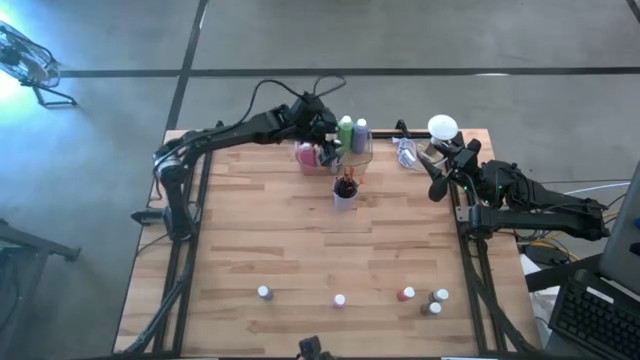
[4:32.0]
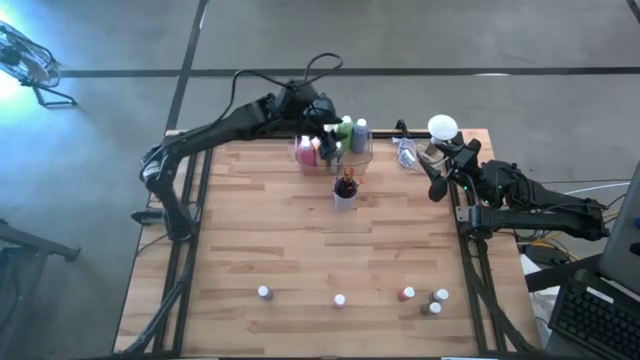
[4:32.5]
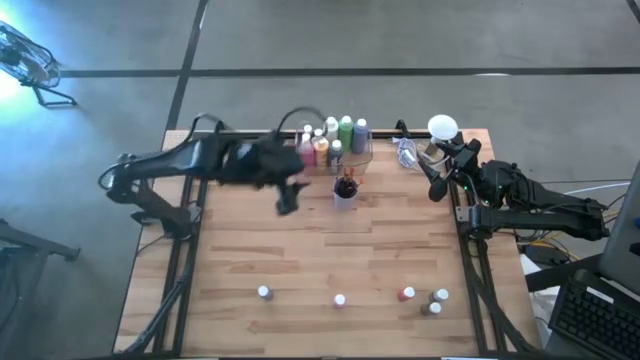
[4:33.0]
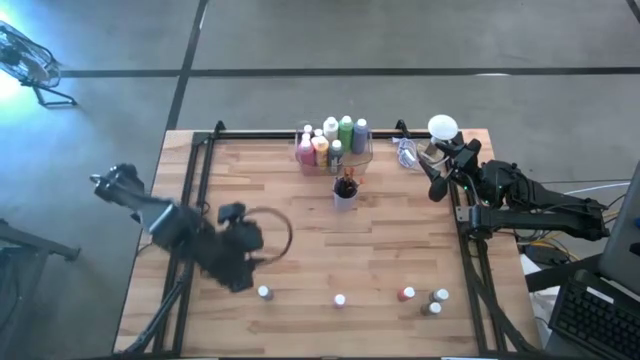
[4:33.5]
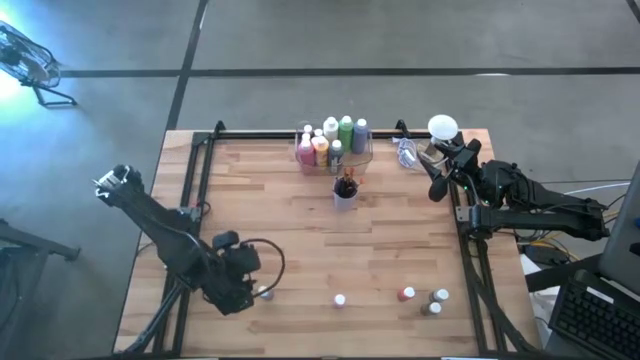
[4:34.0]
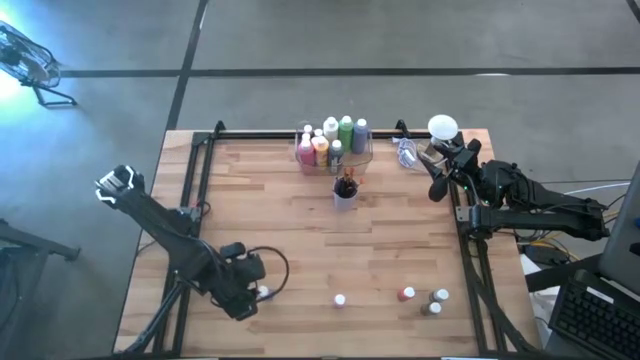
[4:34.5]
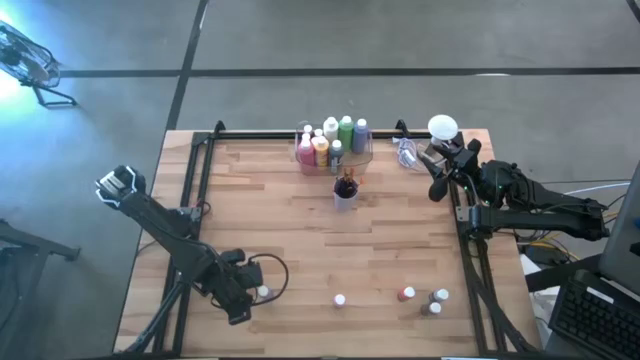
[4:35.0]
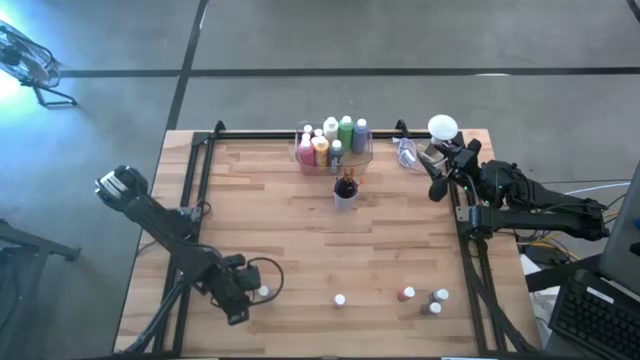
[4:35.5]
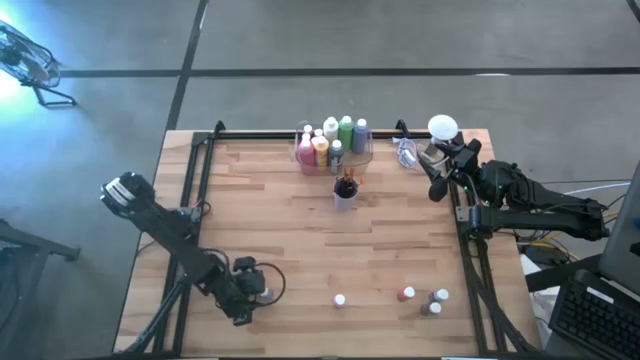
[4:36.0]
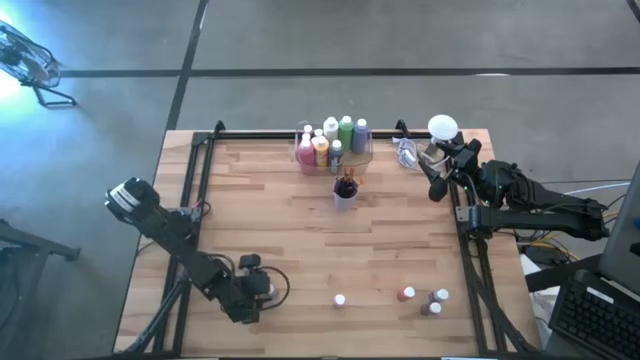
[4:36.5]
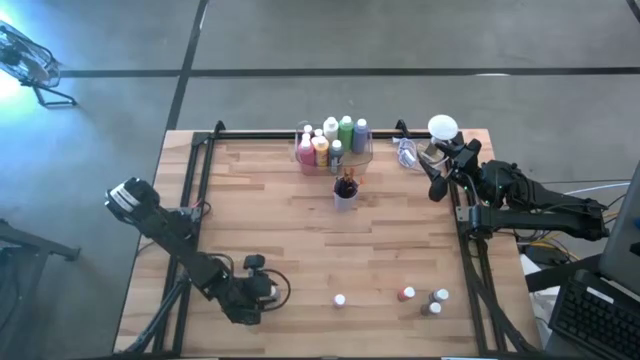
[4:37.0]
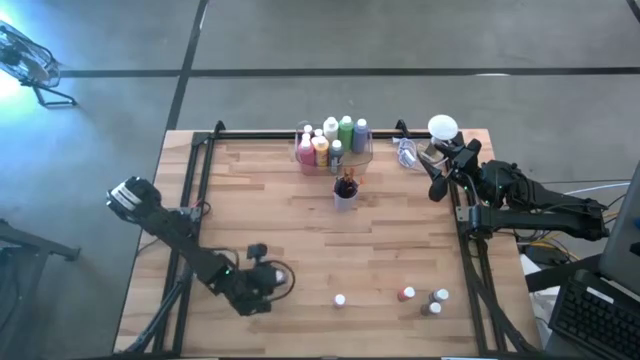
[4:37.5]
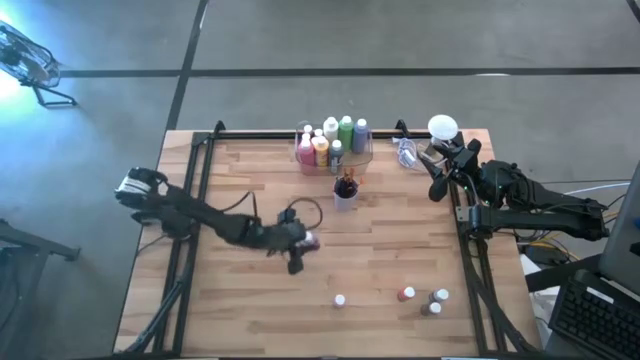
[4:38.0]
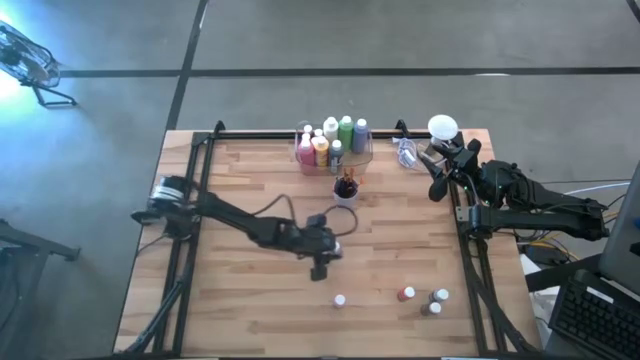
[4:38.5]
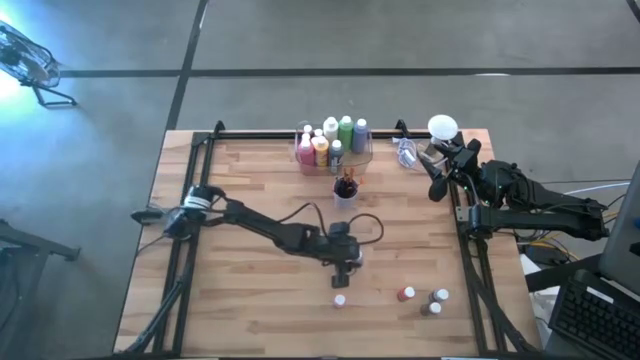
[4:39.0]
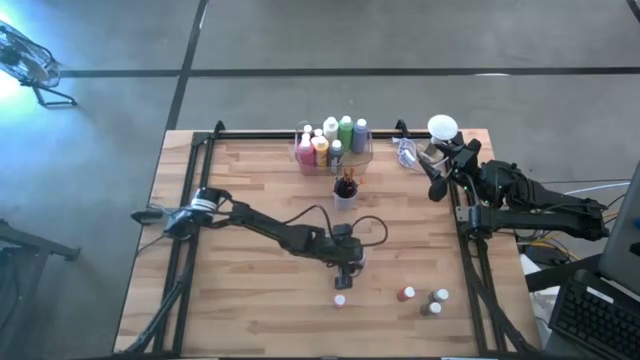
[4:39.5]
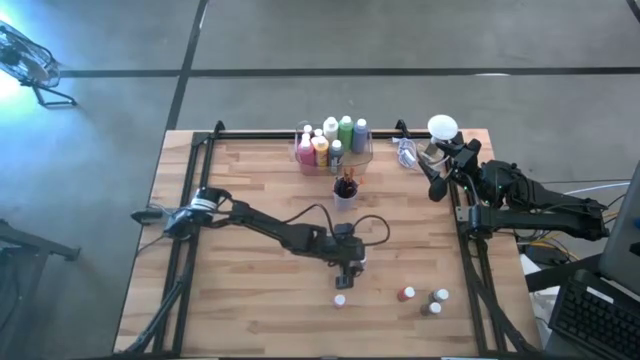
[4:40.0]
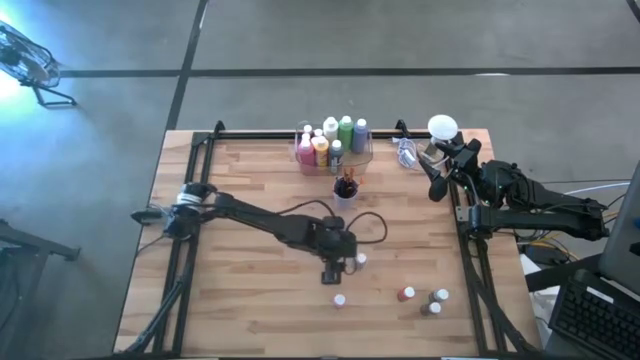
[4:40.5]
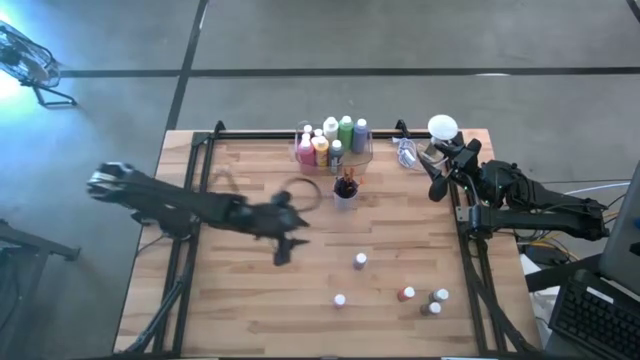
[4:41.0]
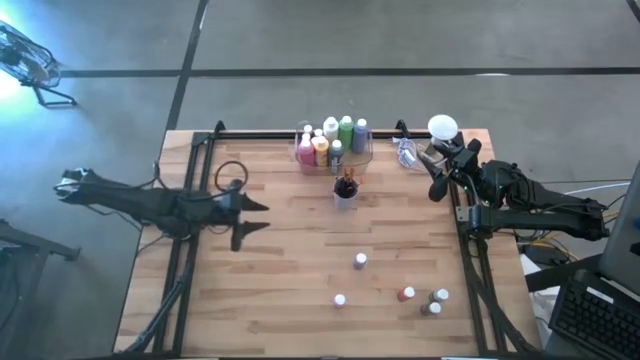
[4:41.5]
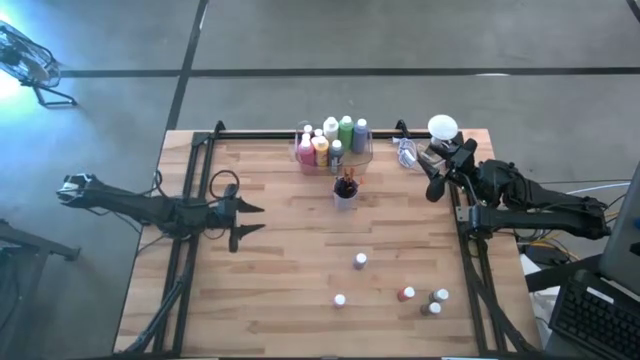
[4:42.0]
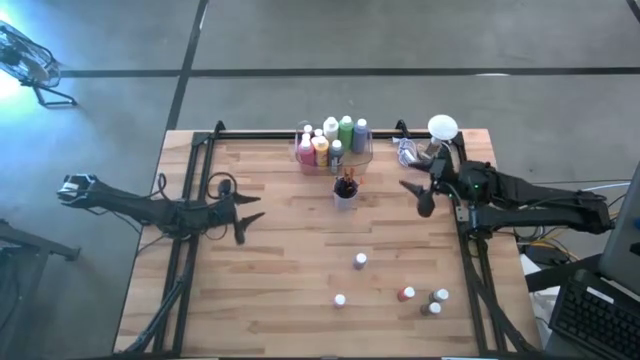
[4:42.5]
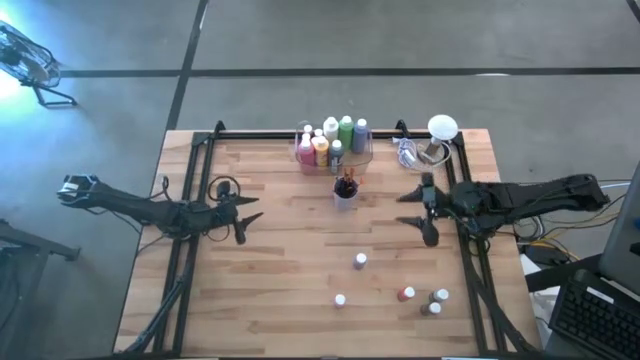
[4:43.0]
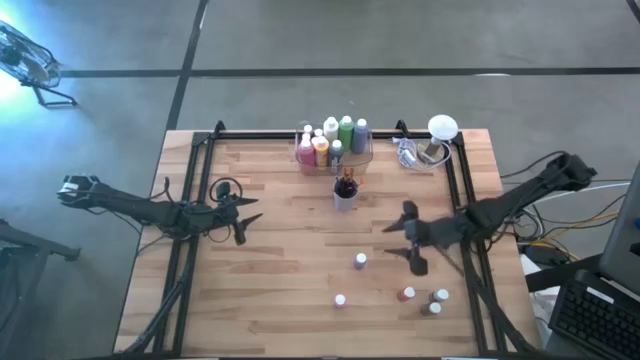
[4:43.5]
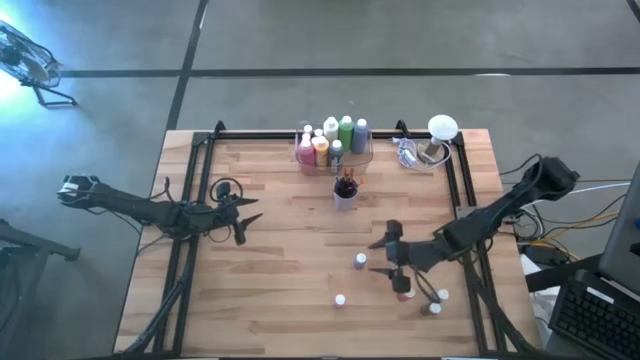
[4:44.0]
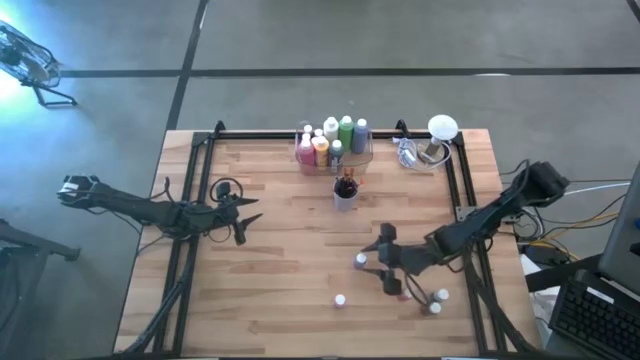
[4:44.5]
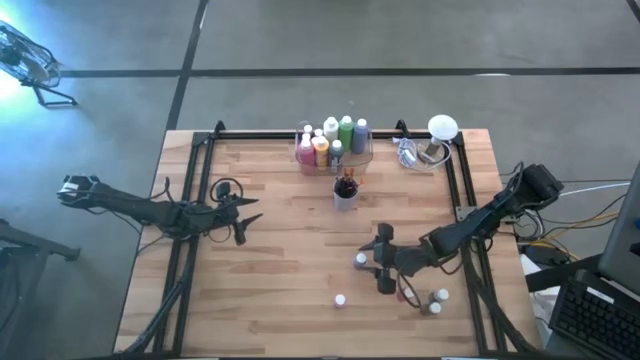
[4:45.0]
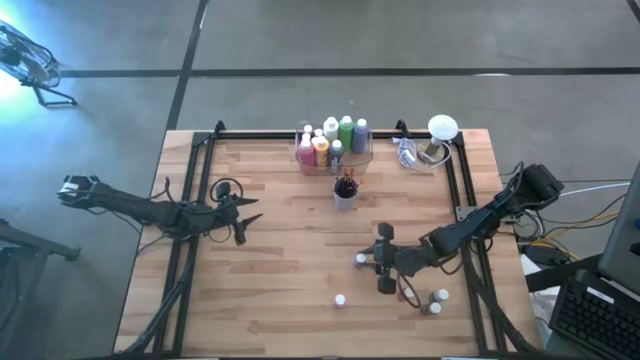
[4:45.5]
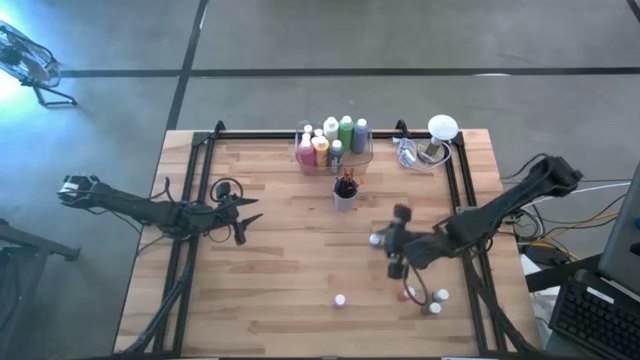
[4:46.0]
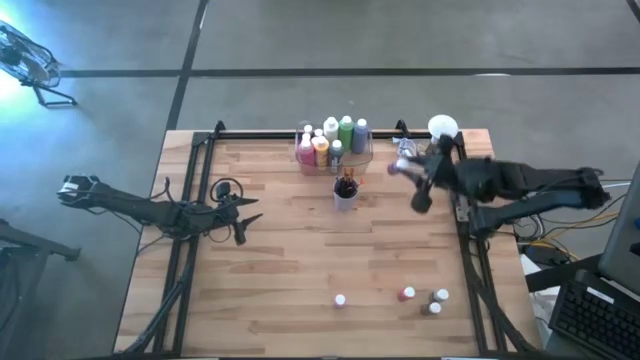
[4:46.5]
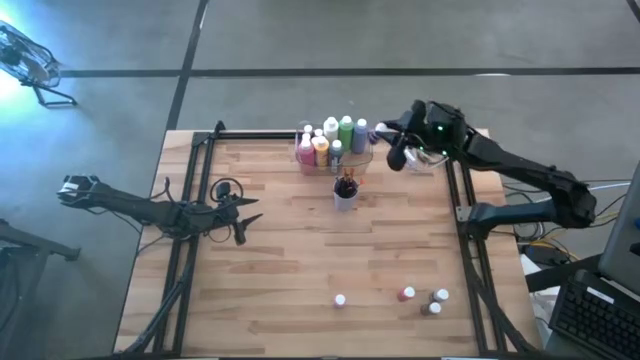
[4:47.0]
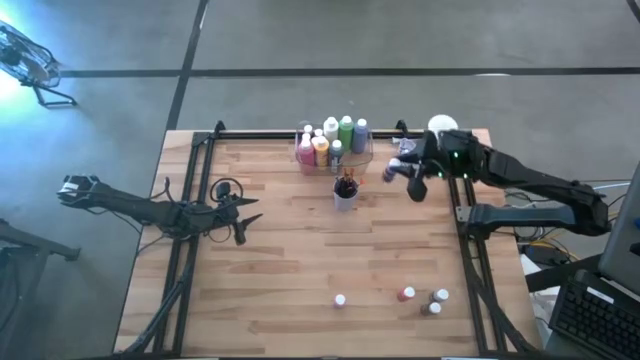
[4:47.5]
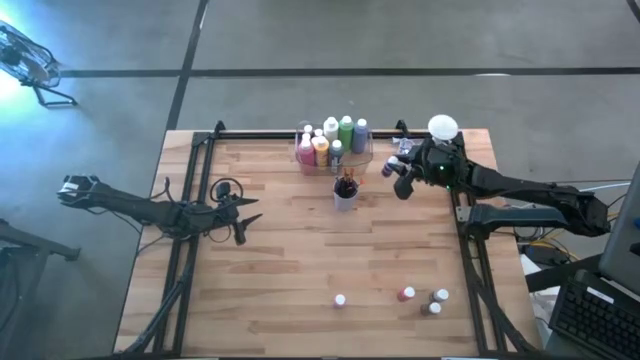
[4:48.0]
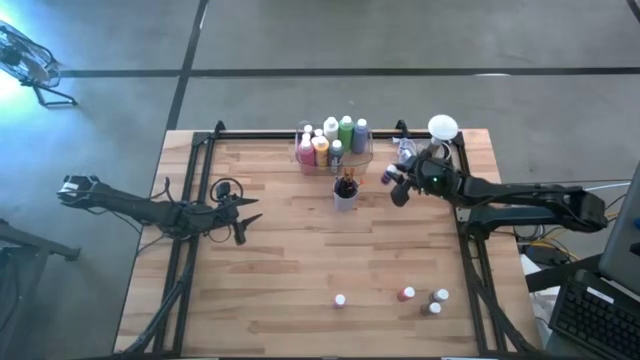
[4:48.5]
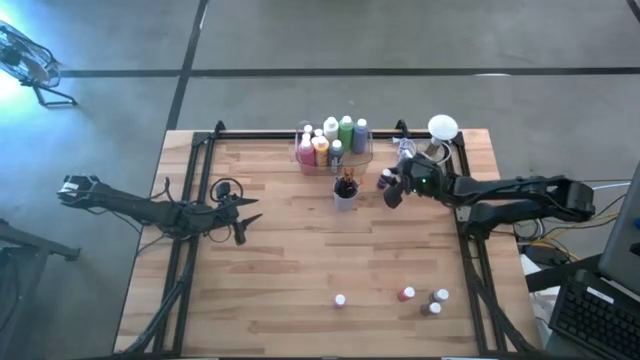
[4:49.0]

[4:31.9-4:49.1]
Task: Pick & Place Paint Supplies
Put the purple black paint bottle into the transparent bin

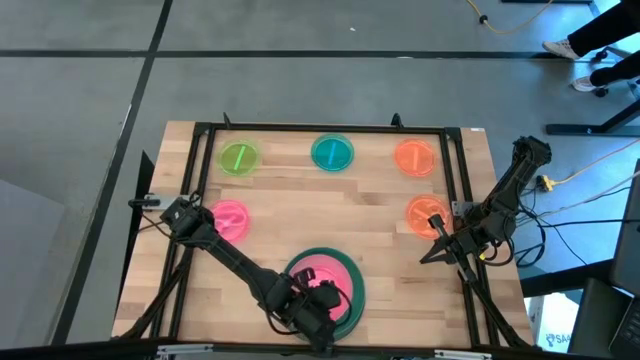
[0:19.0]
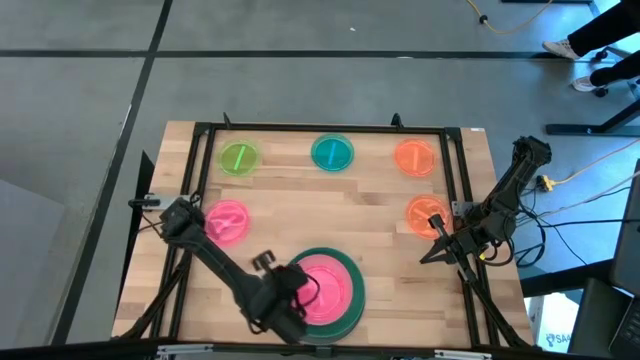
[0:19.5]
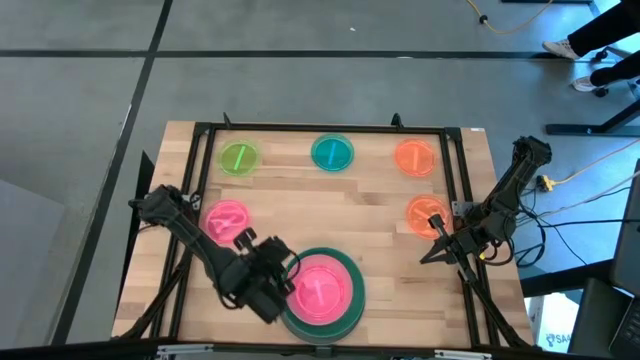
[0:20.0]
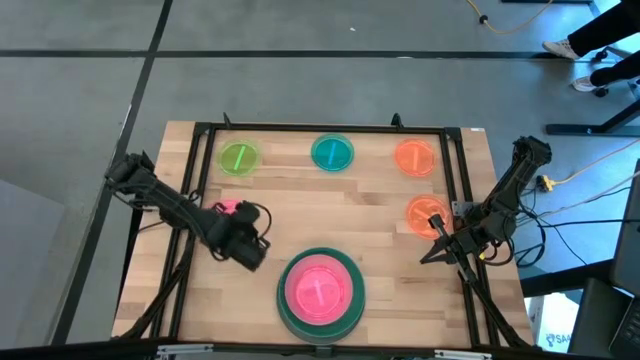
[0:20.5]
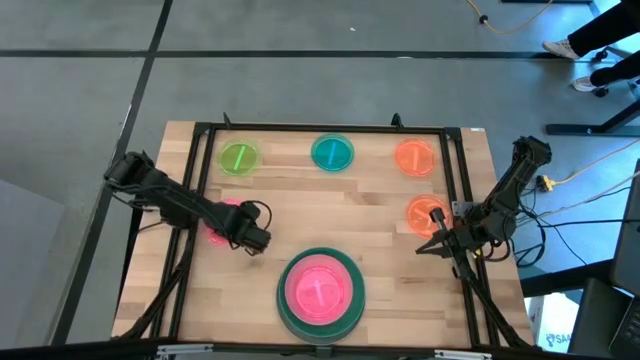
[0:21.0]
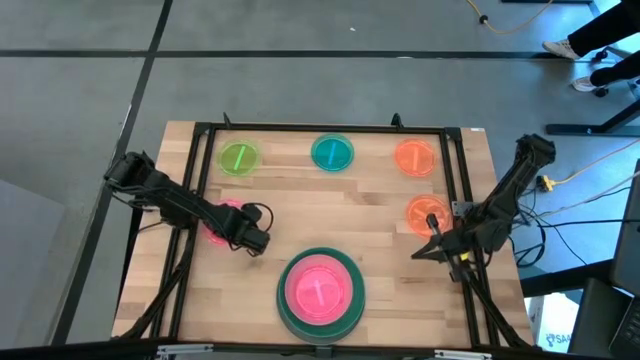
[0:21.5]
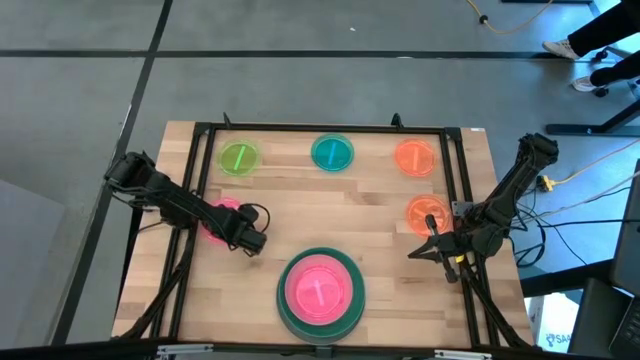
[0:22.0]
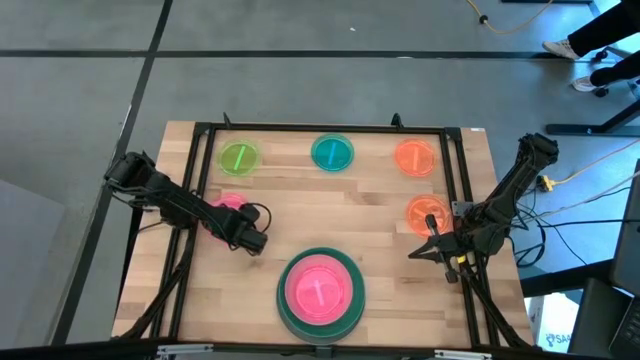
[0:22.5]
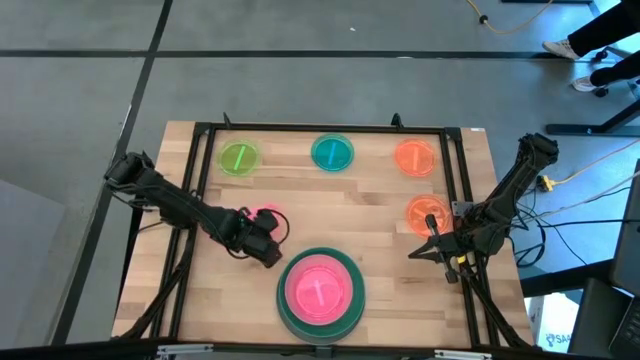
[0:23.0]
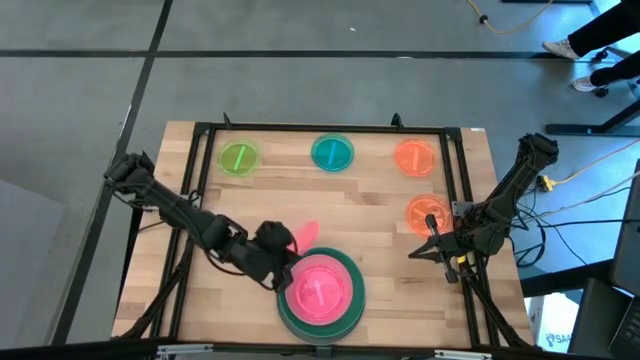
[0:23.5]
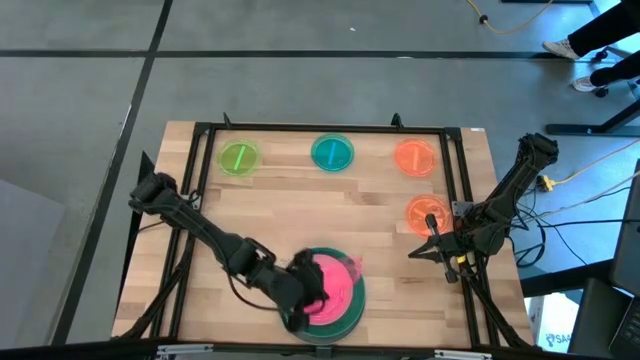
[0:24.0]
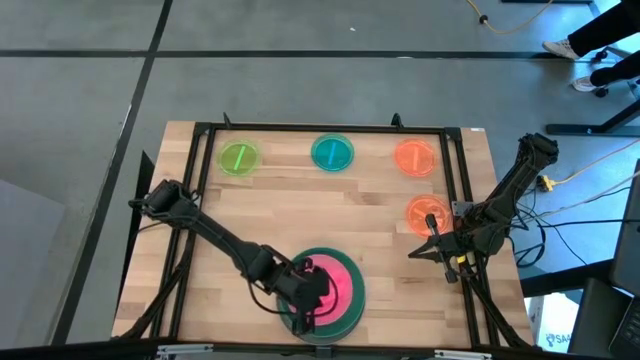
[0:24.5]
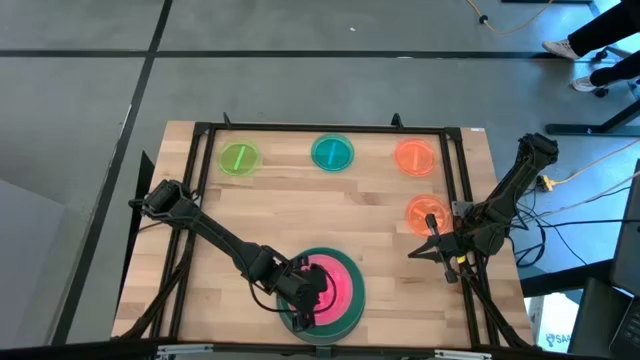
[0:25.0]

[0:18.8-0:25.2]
Task: Stack plastic plates
Stack the light pink plate on top of the light pink plate
